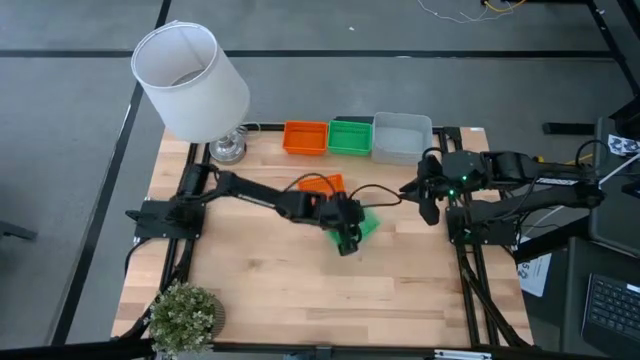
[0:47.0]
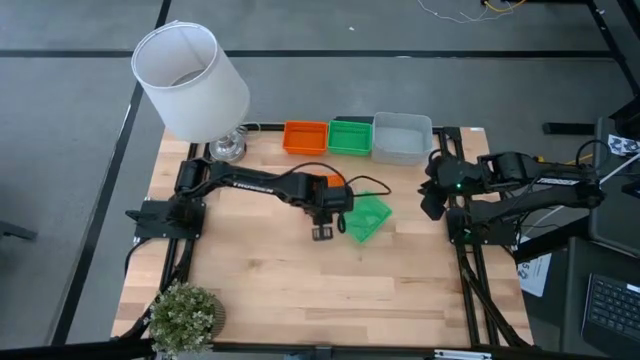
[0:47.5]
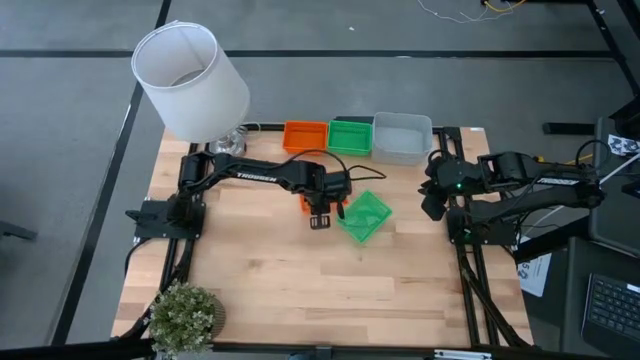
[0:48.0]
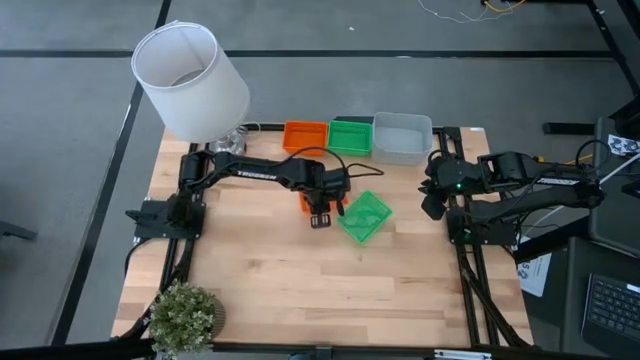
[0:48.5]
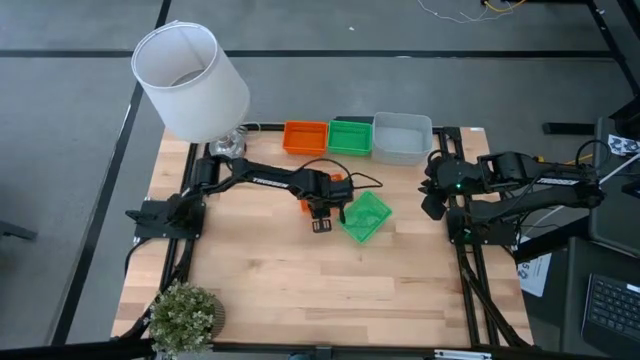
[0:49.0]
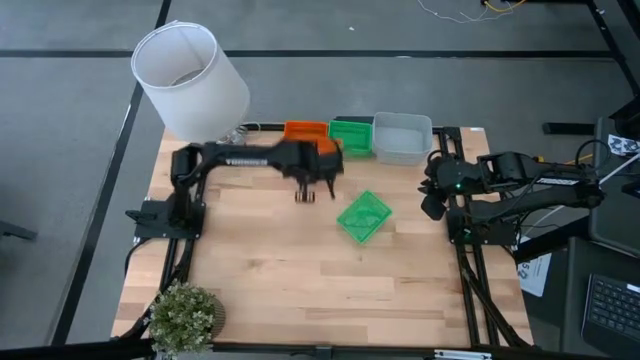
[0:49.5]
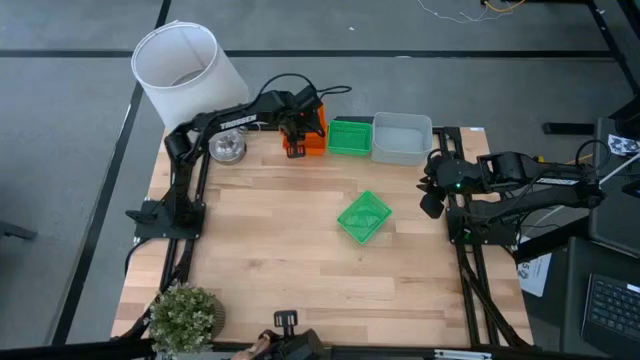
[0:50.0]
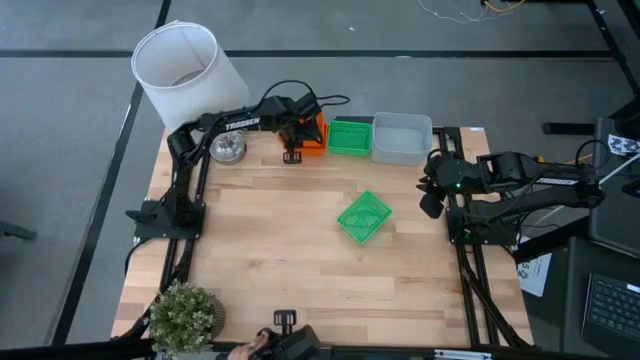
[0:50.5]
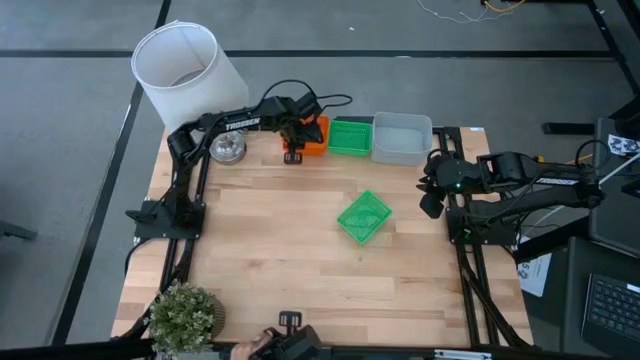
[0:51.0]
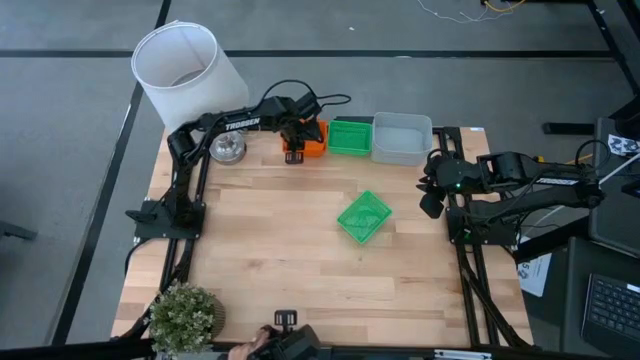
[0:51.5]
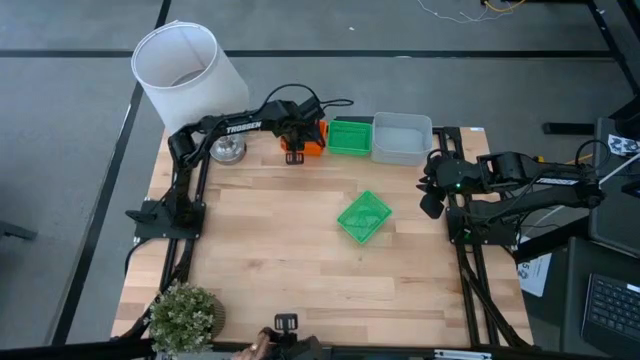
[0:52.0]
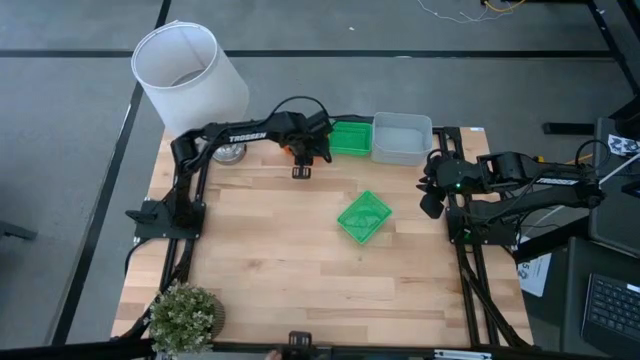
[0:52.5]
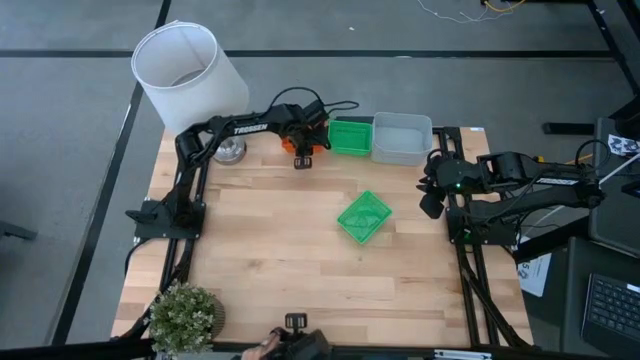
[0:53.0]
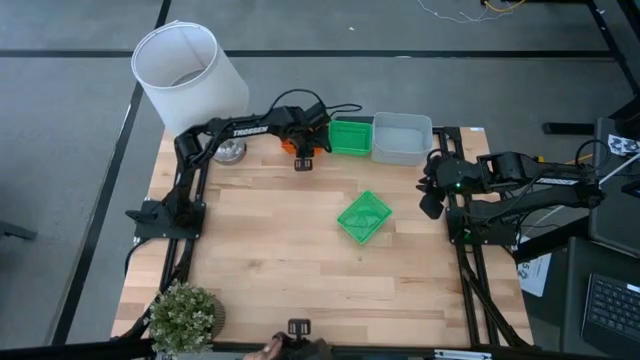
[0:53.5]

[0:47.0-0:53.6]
Stack the bottom orange bin on the top of the stacked orange bins

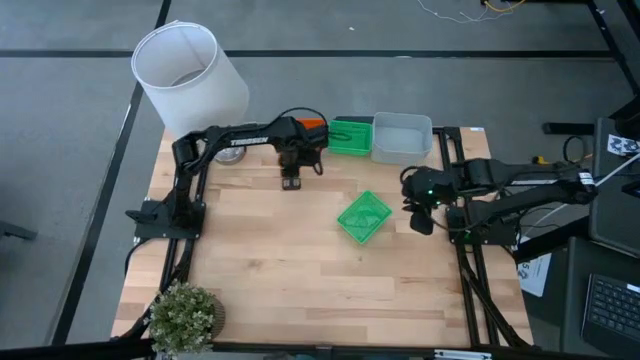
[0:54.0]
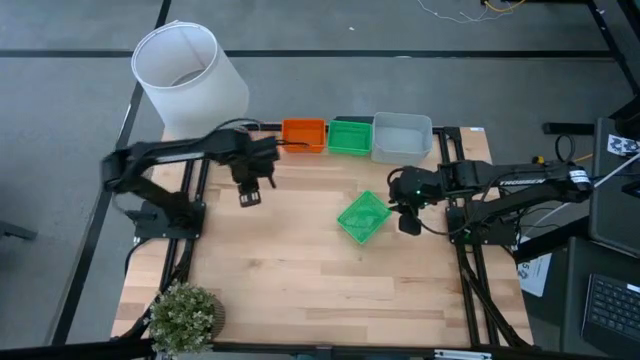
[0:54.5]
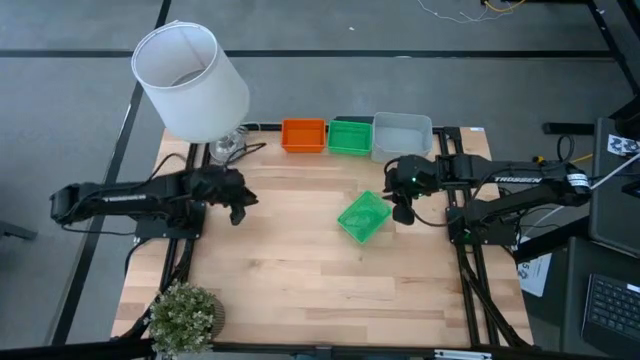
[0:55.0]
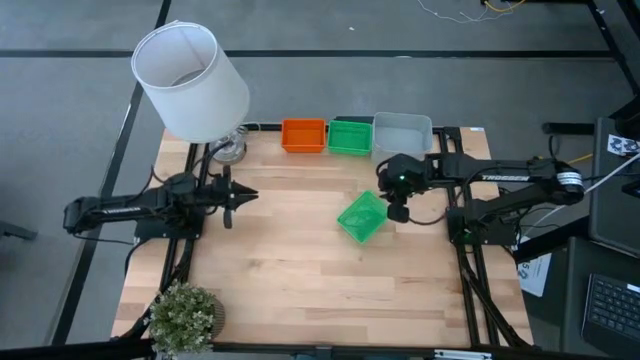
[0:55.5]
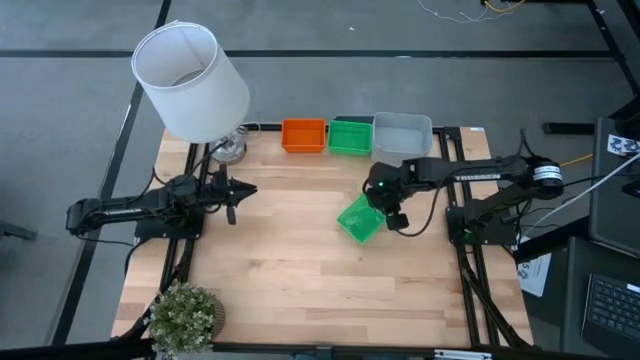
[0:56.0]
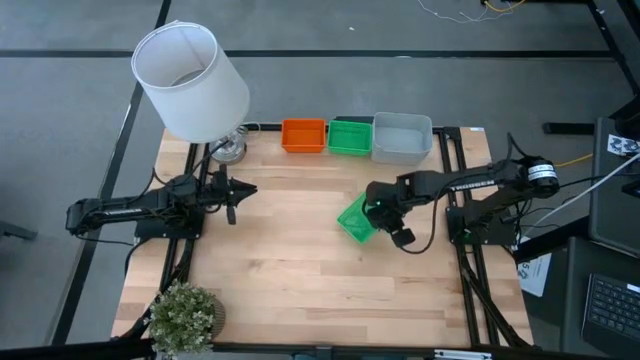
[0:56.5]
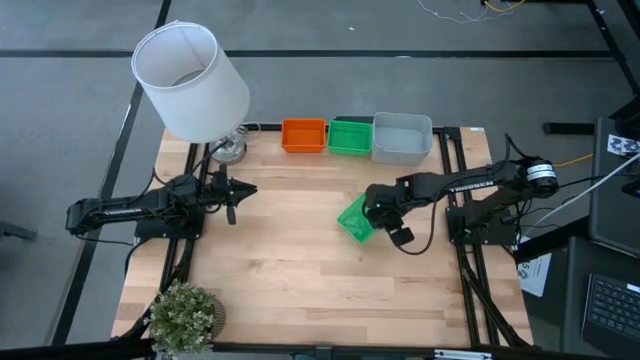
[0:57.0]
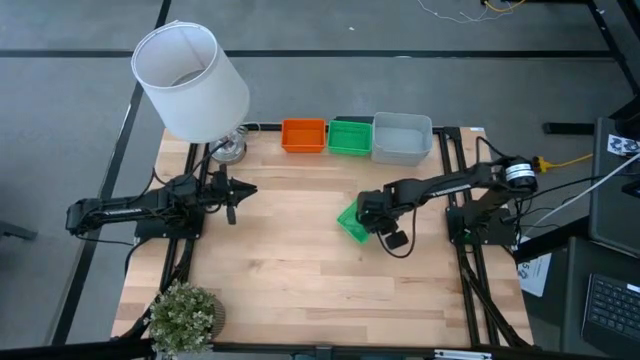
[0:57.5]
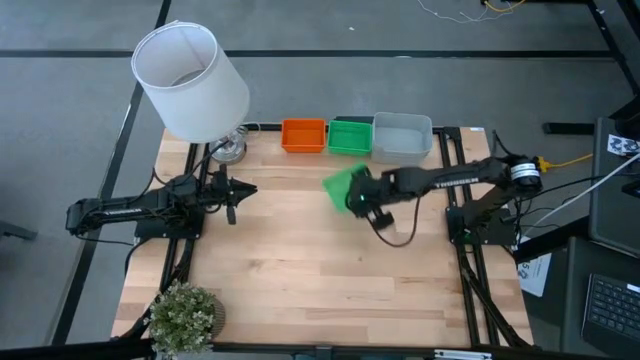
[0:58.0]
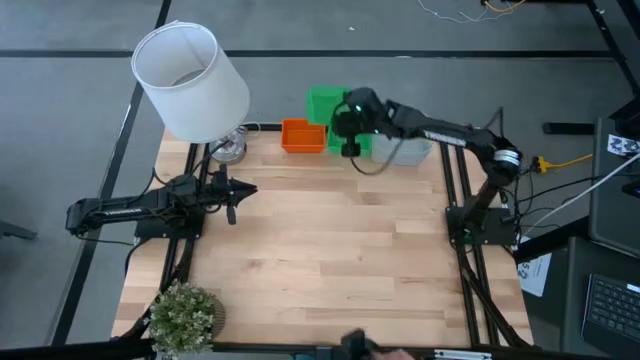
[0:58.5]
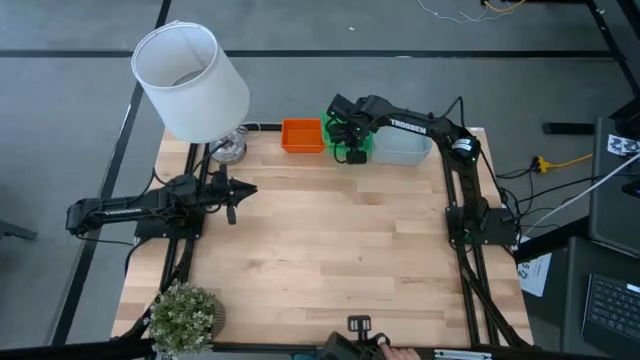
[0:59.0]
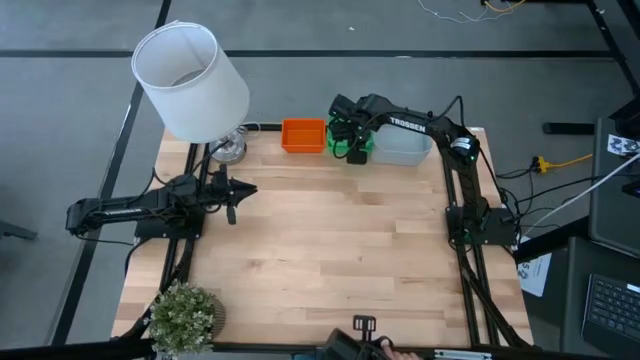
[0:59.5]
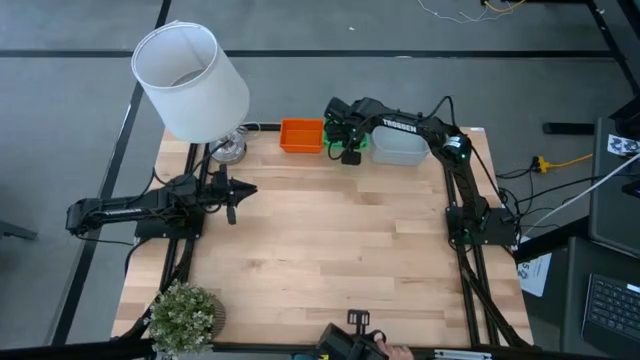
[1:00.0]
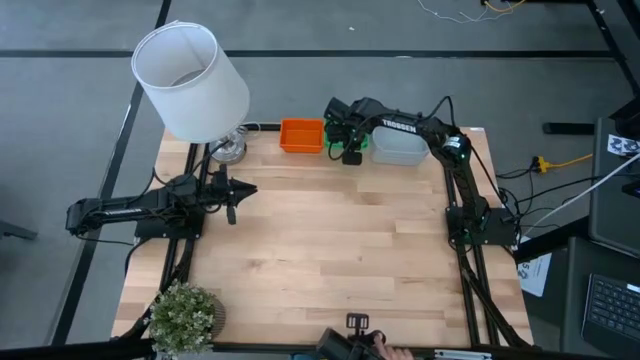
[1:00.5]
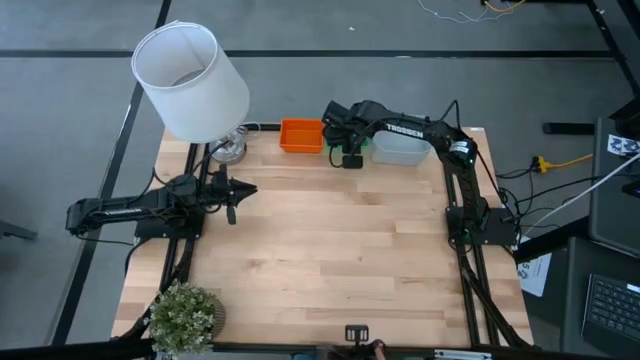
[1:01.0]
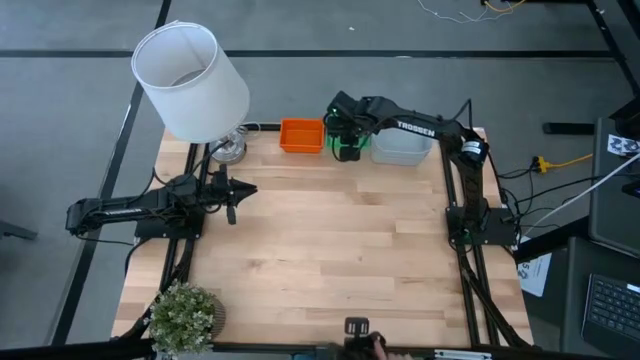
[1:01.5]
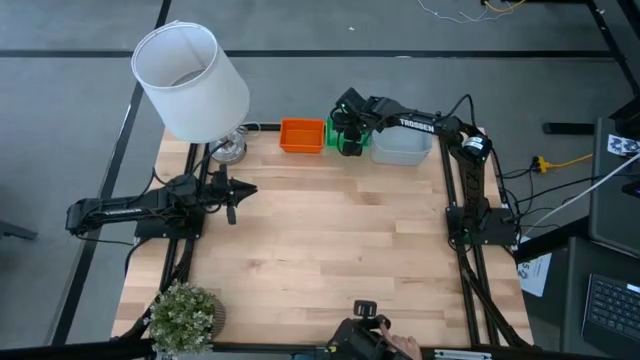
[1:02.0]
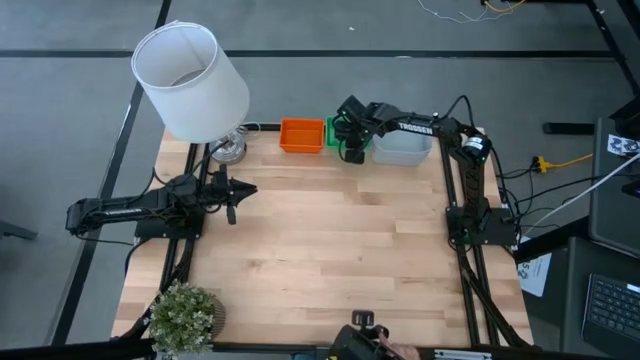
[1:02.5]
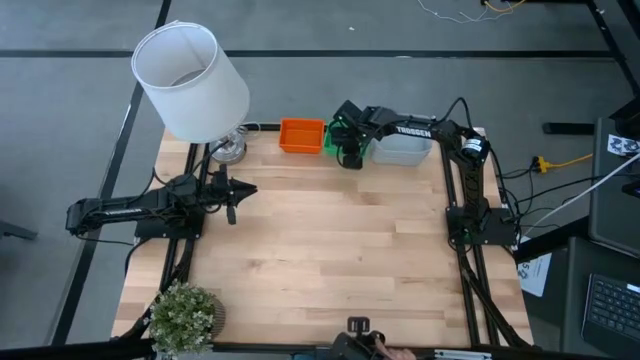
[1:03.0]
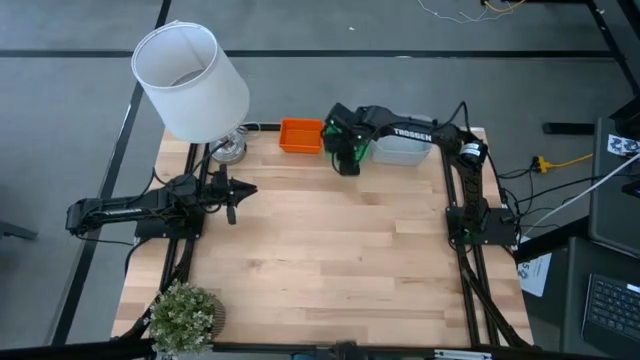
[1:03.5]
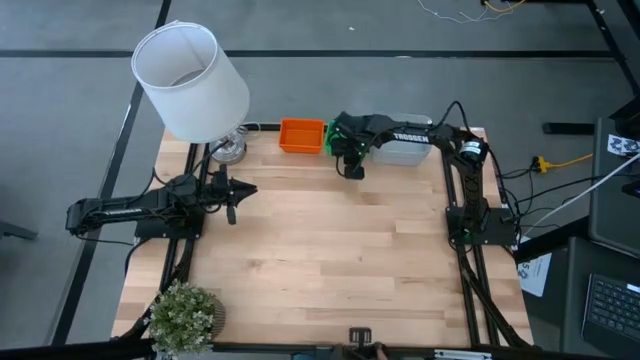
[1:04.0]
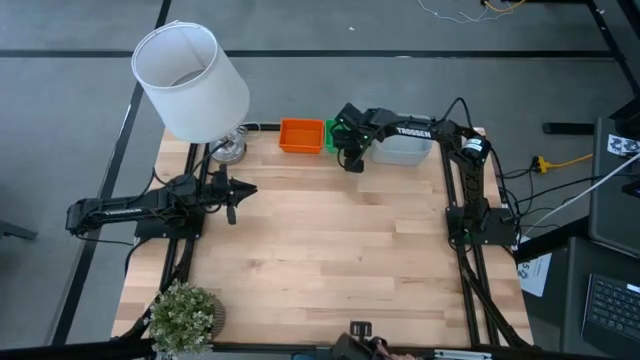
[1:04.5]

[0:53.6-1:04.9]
Stack the bottom green bin on the top of the stacked green bins

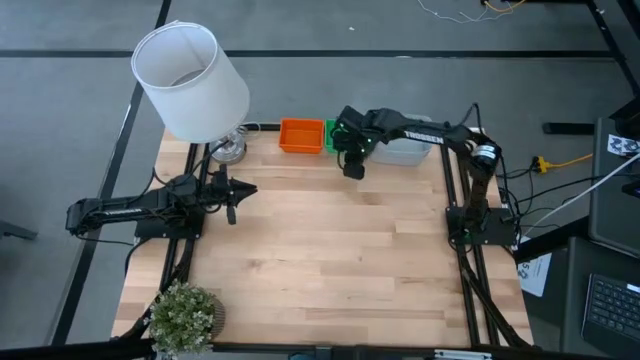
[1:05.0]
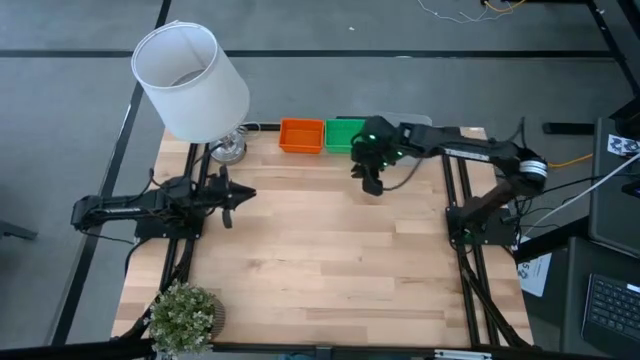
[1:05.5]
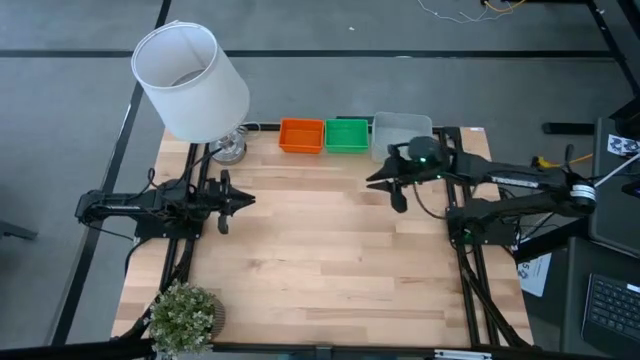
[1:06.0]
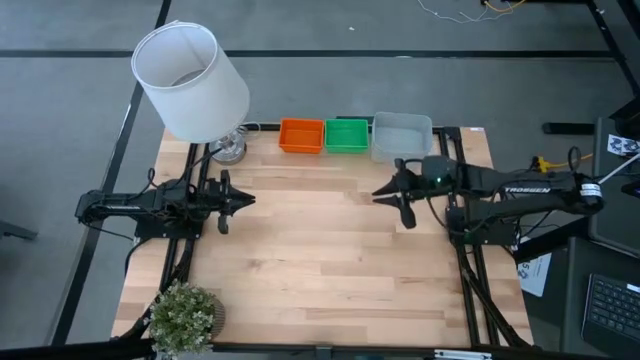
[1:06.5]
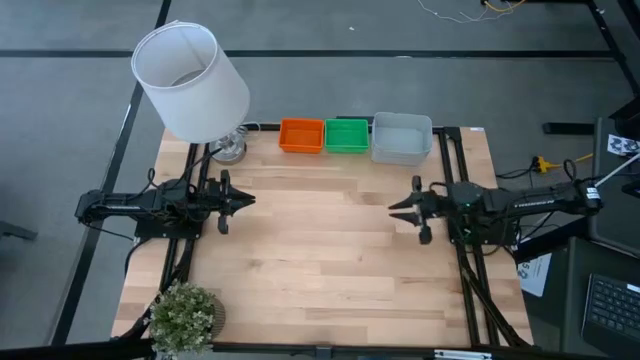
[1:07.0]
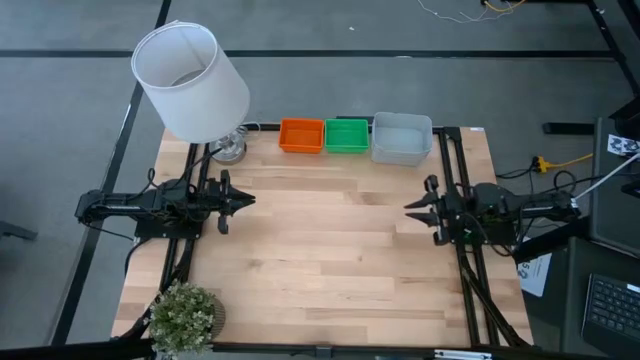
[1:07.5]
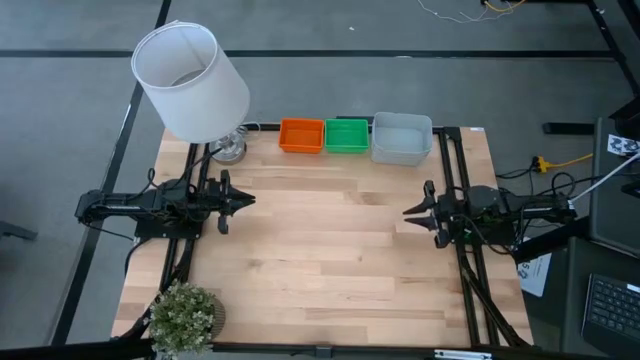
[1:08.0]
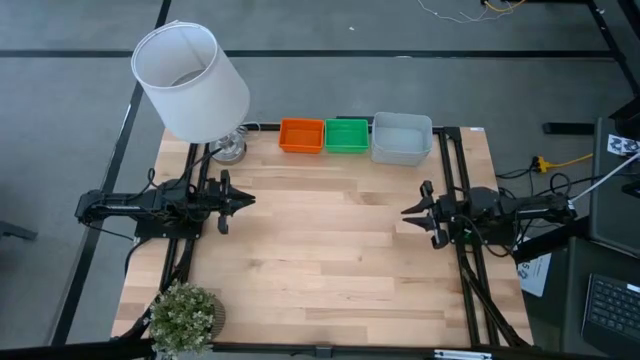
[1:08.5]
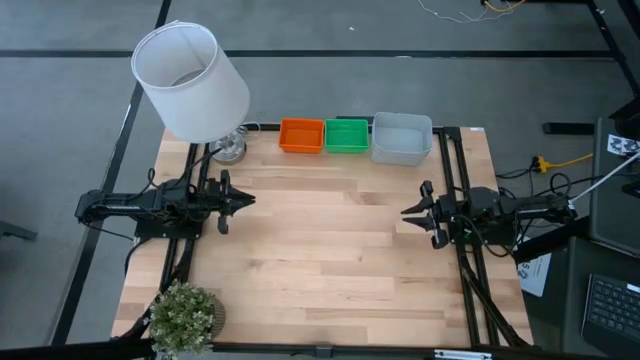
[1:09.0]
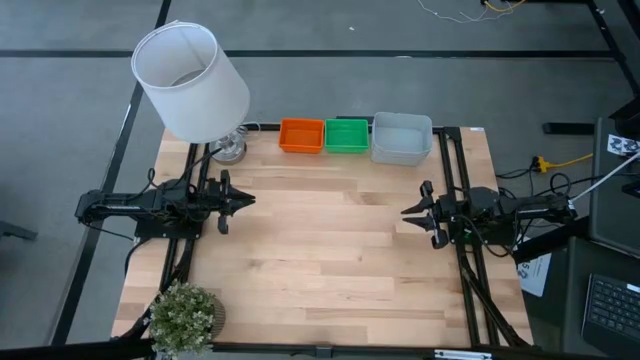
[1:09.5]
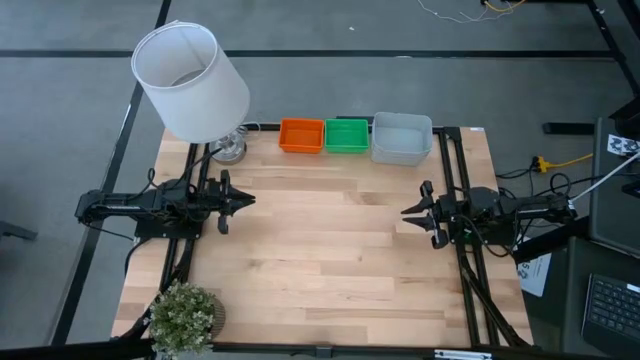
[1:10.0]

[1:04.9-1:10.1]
Return to Home Position
